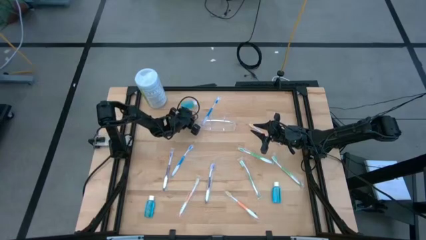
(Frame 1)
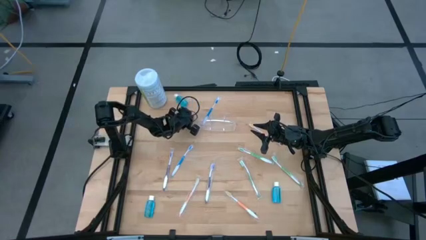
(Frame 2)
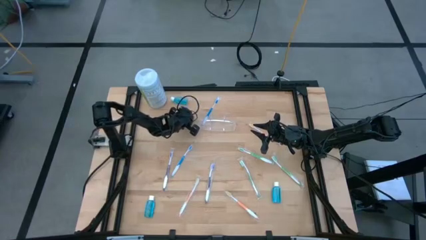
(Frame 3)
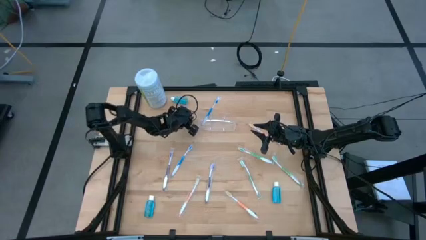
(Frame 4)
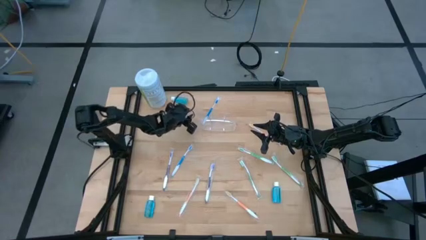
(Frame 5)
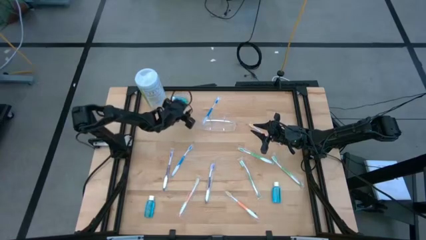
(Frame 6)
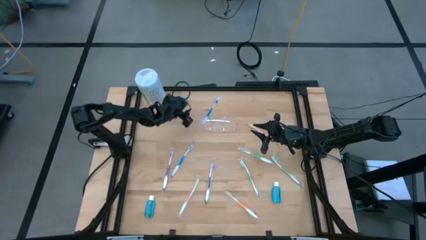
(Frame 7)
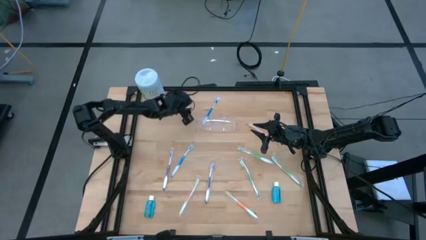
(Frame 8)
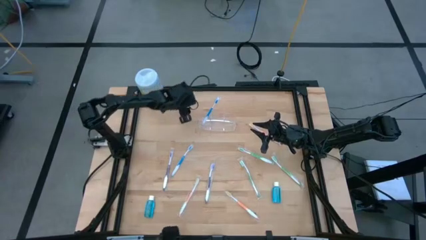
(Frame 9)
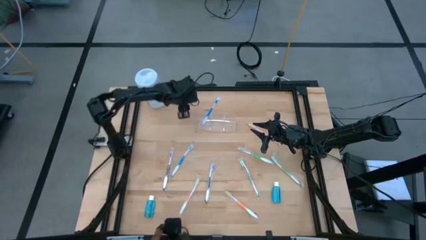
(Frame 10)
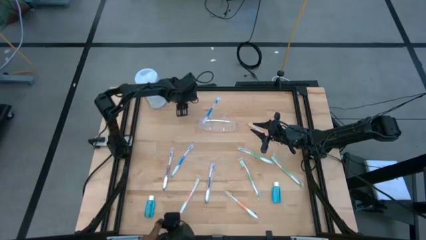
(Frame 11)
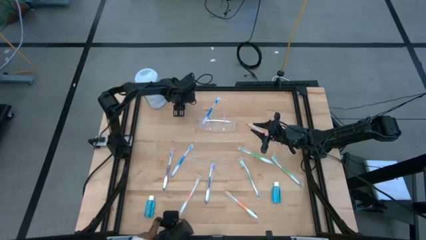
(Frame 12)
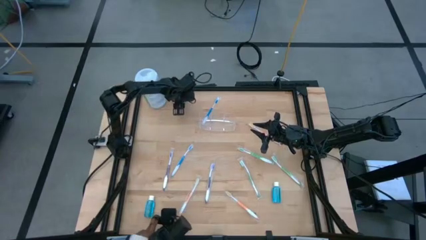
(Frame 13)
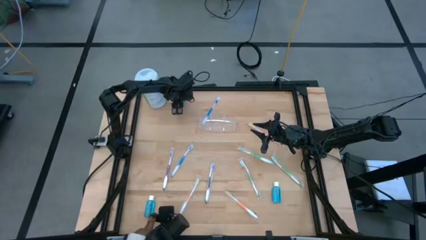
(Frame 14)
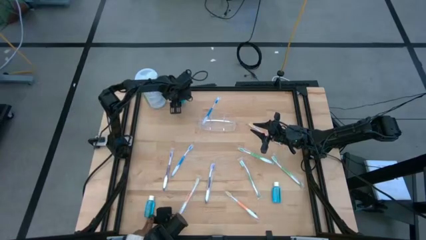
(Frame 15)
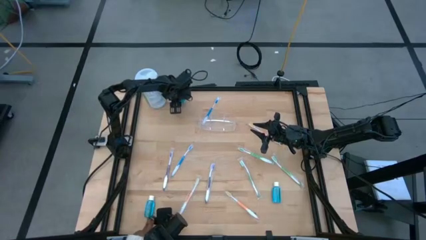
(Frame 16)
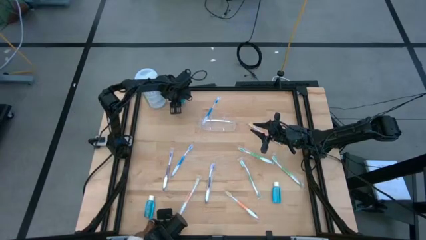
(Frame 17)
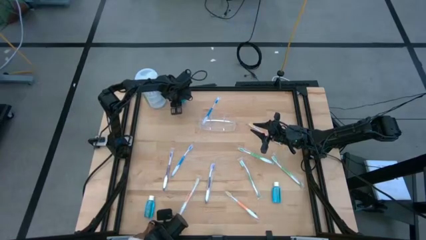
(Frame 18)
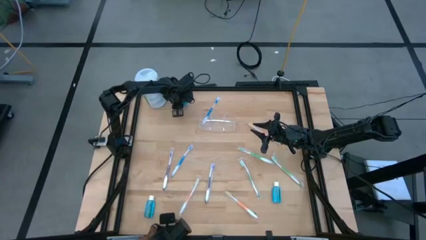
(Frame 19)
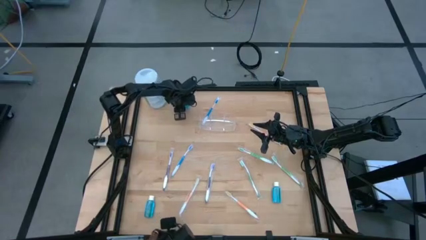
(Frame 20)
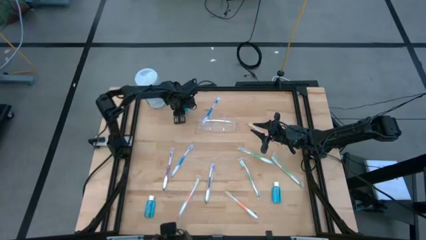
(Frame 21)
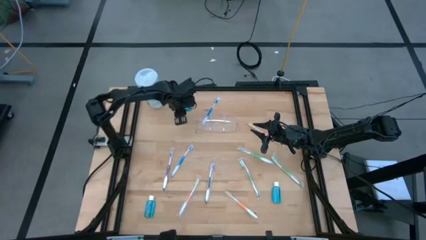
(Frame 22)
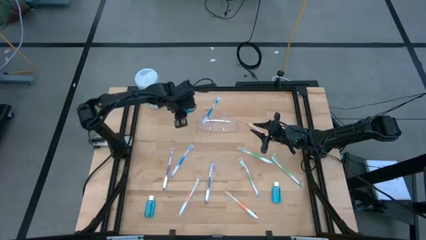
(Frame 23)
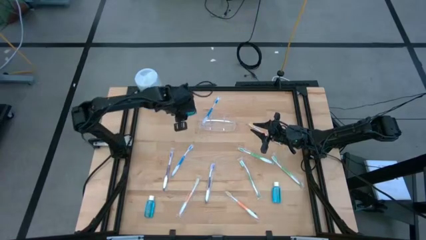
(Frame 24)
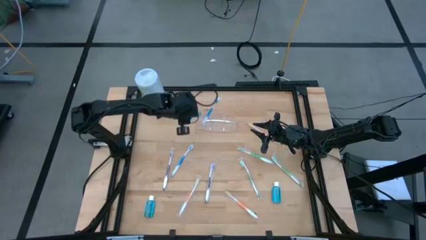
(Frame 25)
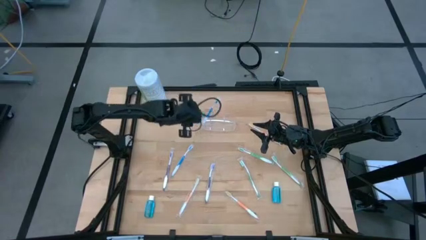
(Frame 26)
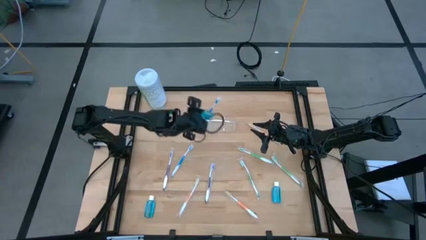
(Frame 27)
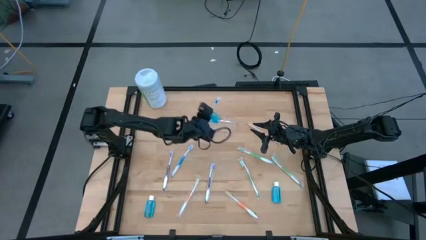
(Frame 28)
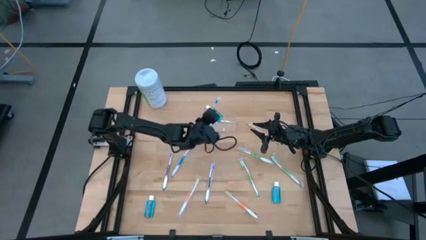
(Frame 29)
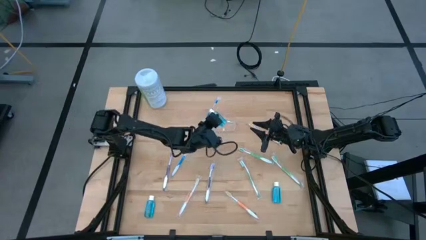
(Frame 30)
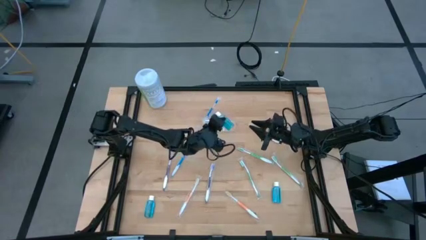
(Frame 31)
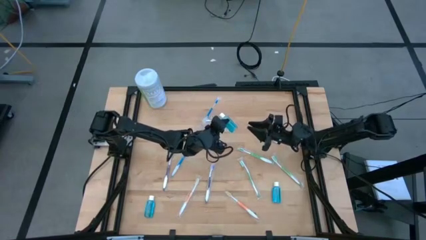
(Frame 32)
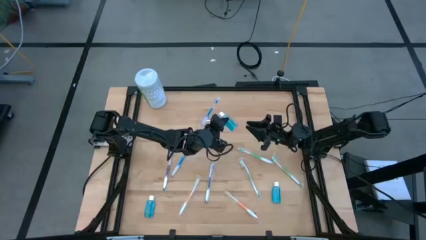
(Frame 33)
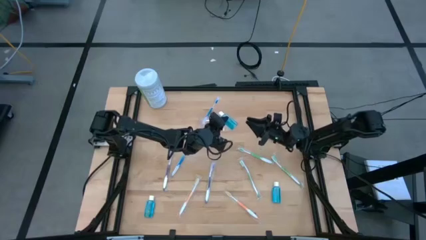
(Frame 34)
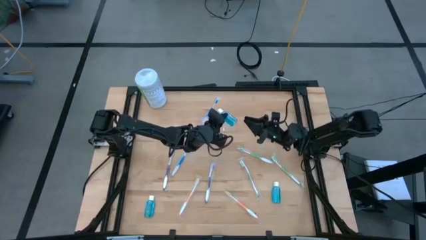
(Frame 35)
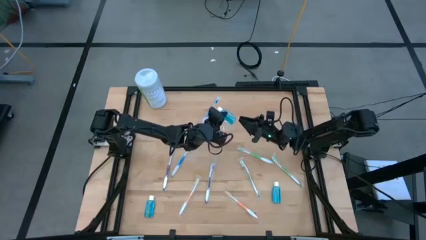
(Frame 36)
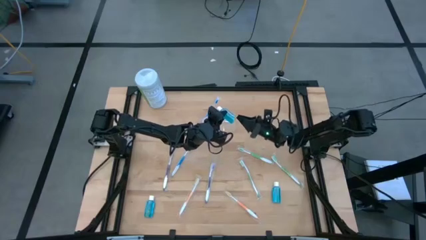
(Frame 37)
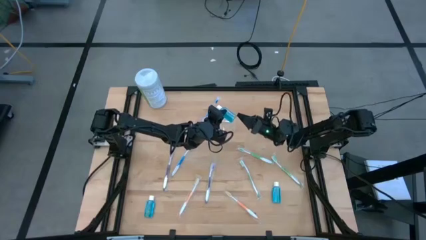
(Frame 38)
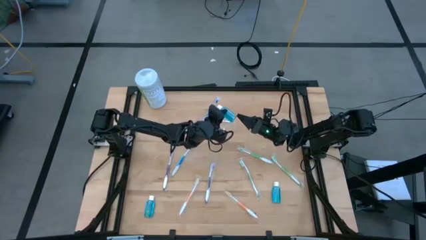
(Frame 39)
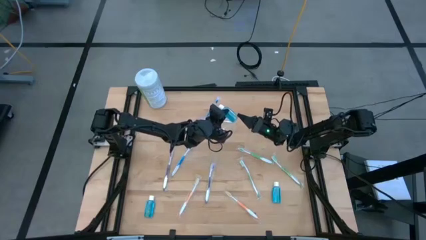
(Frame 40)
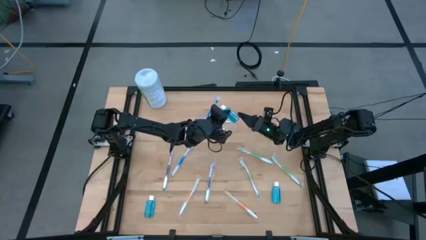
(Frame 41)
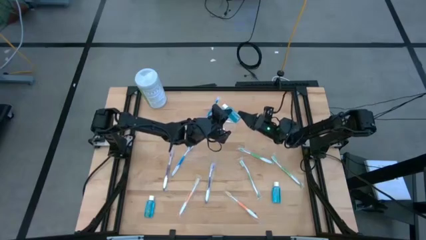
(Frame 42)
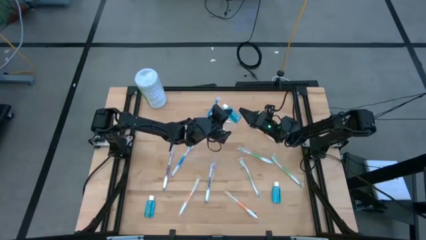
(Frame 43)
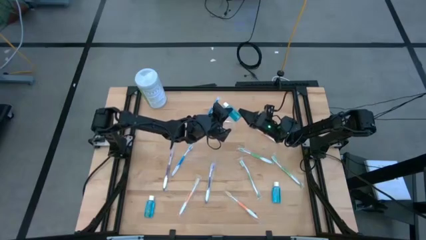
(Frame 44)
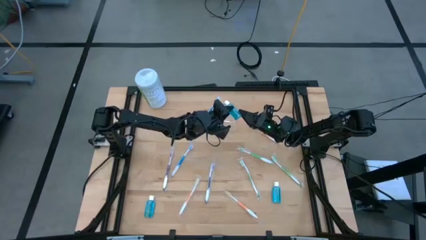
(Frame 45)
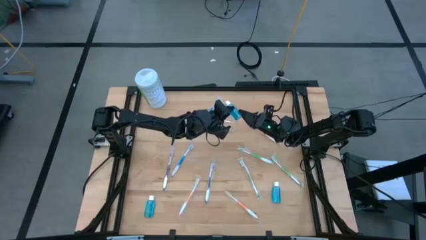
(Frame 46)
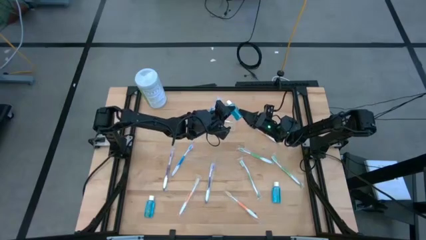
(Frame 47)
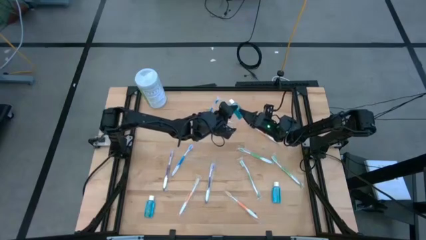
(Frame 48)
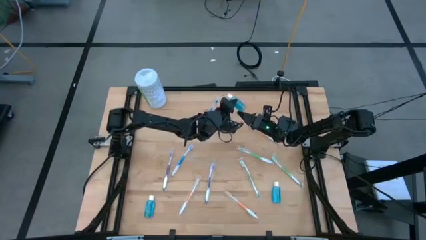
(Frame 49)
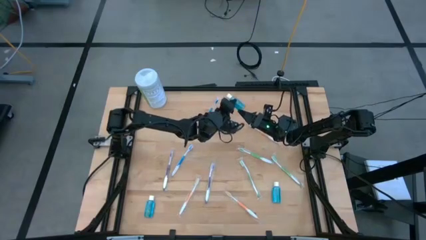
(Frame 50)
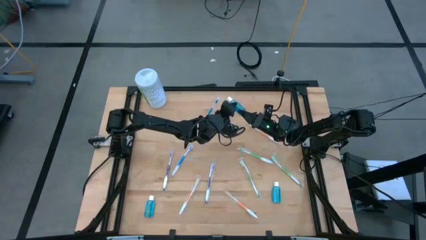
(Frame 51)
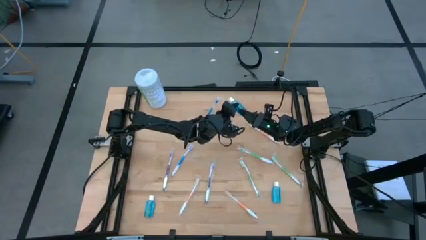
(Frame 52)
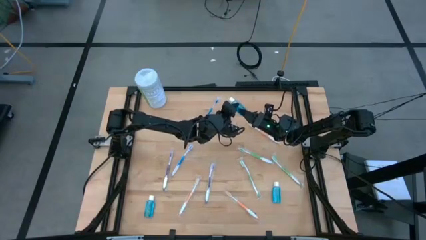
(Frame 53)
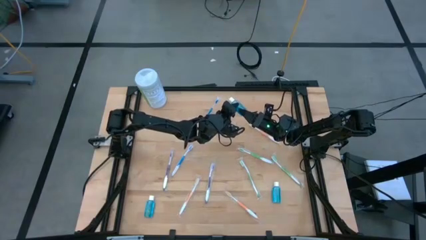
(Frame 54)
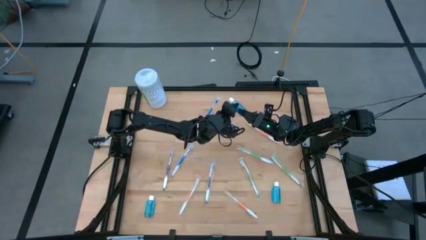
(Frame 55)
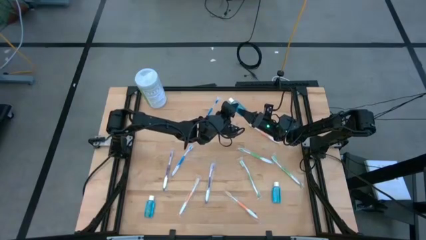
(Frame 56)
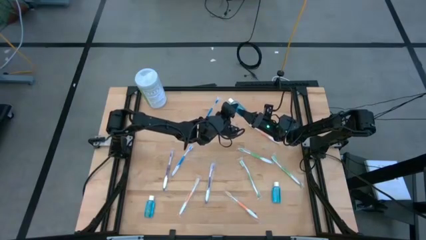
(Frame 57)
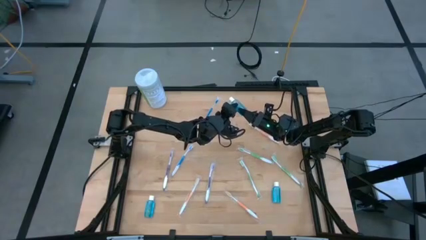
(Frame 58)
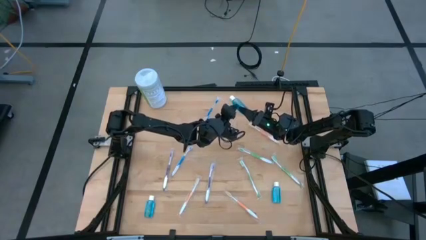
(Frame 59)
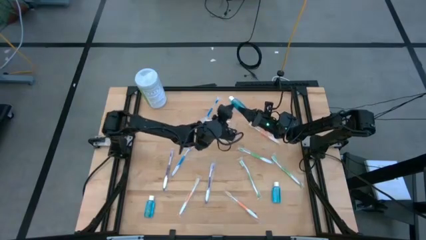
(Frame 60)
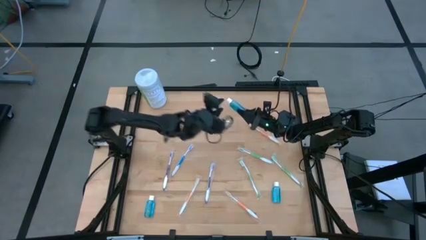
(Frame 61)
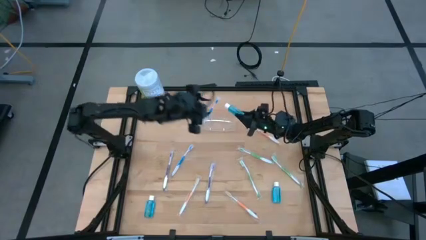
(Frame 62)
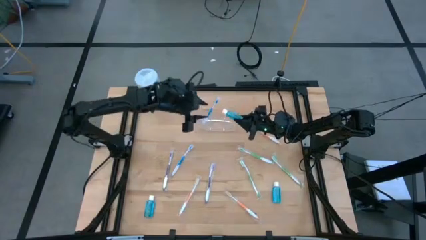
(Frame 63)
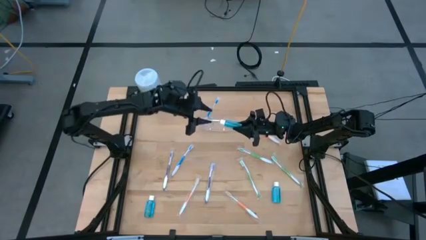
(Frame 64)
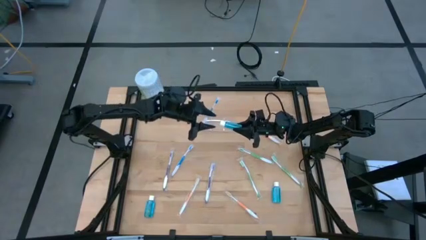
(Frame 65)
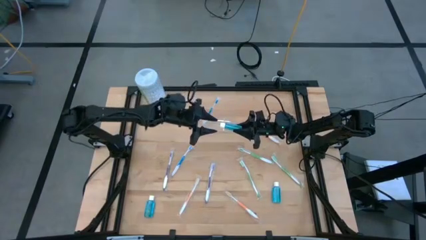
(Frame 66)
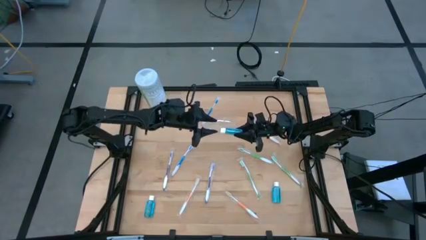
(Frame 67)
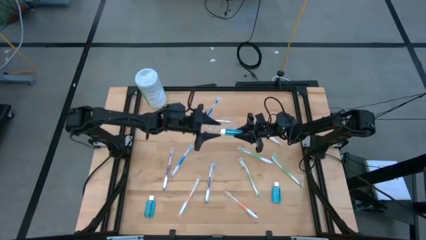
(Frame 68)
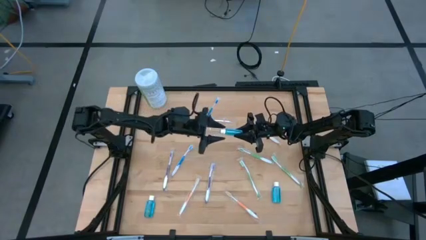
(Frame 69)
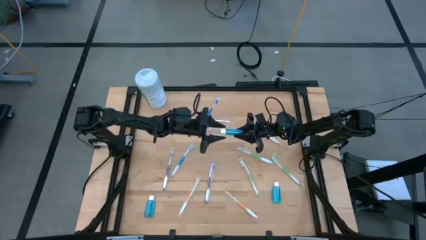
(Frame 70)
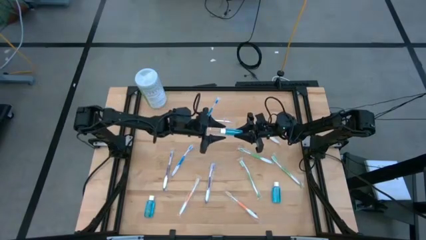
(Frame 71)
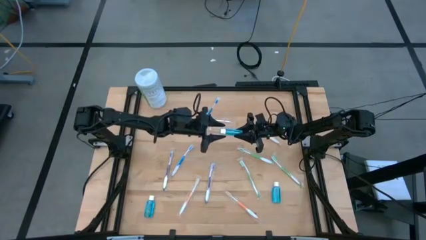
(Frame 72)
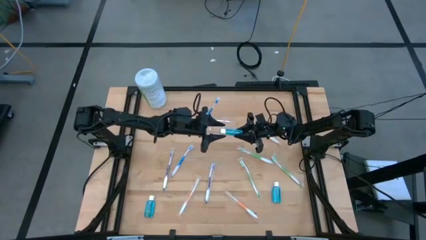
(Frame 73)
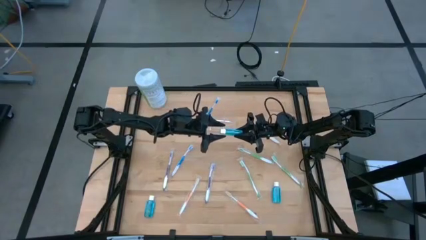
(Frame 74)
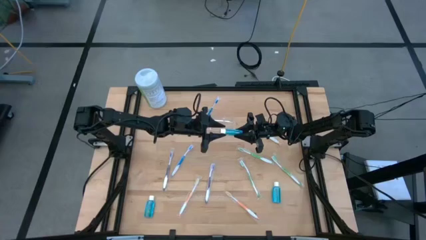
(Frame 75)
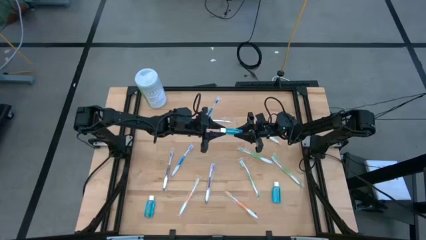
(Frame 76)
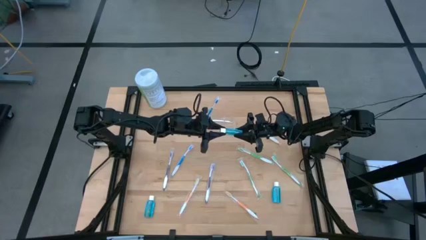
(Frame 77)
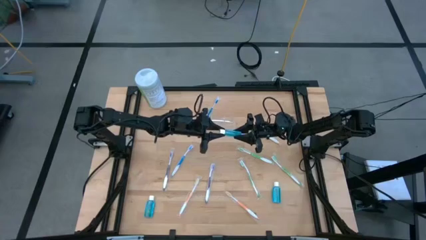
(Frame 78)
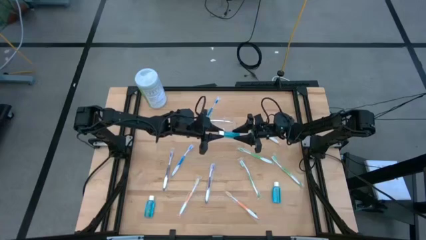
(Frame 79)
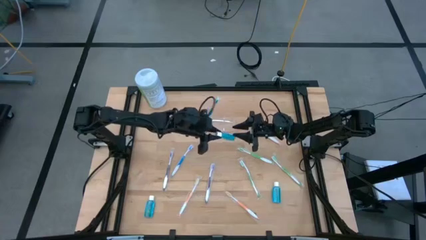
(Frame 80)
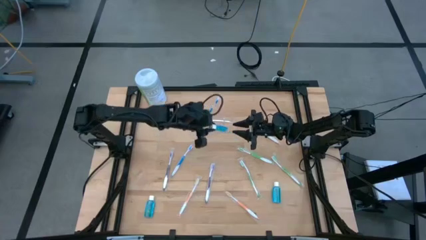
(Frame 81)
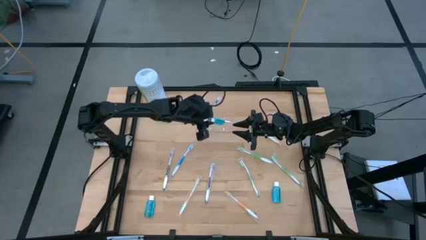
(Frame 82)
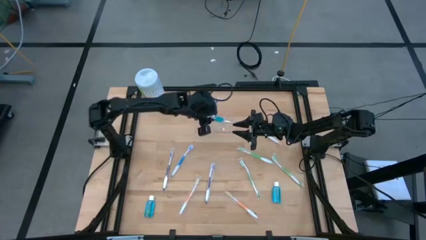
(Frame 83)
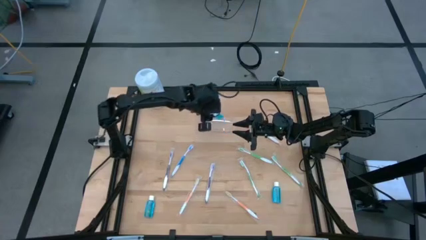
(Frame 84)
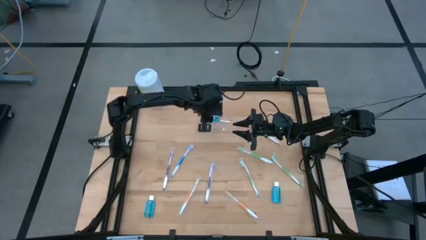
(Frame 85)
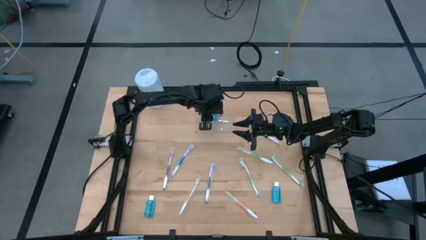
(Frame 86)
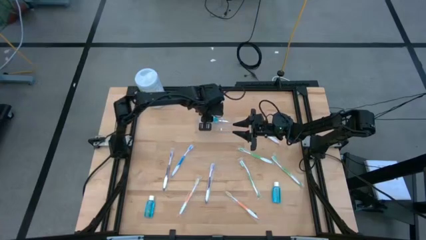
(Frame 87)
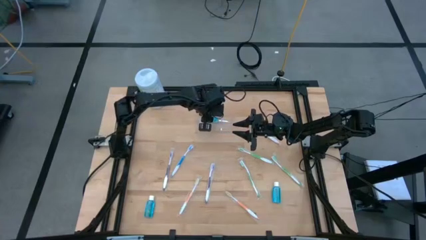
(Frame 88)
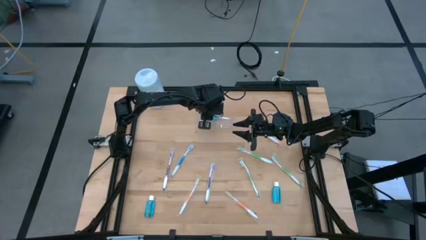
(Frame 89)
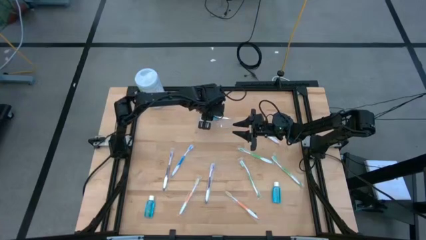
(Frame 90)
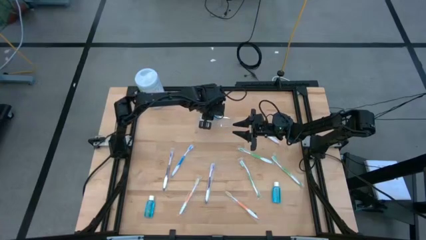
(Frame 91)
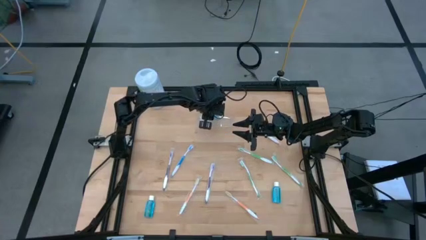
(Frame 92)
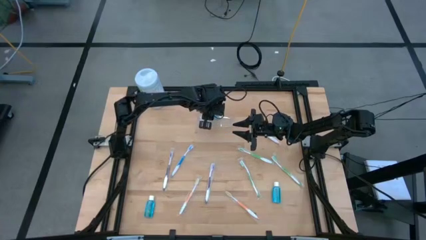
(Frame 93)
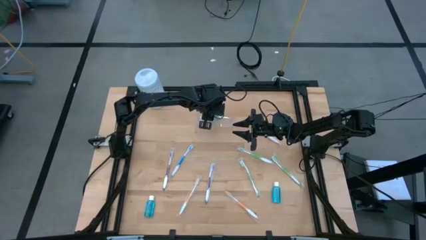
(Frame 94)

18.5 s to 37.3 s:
Task: Pick & Place toothbrushing station
Put the top blue mouthwash bottle into the transparent organizer
